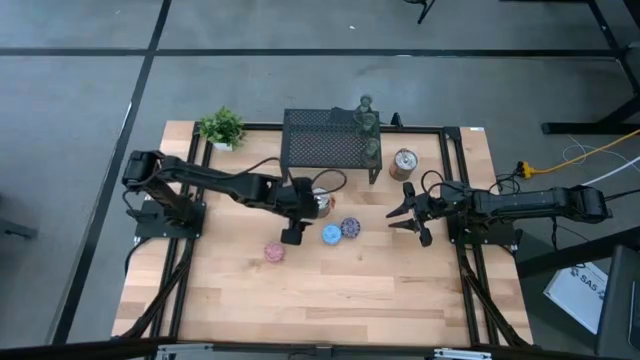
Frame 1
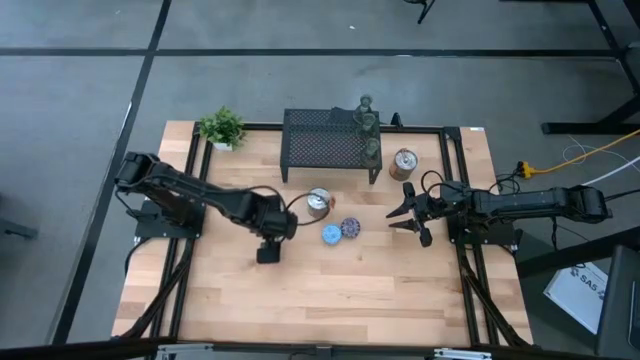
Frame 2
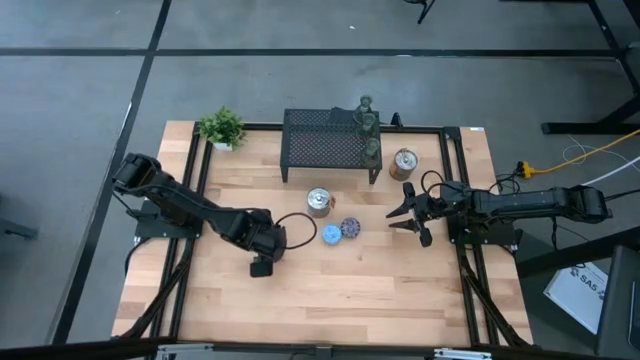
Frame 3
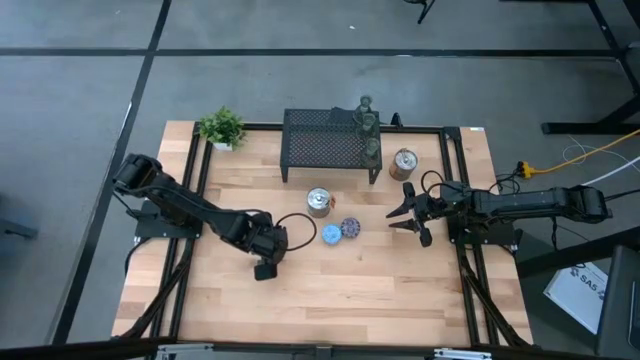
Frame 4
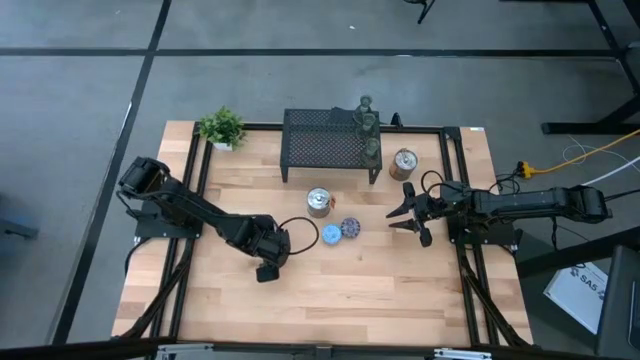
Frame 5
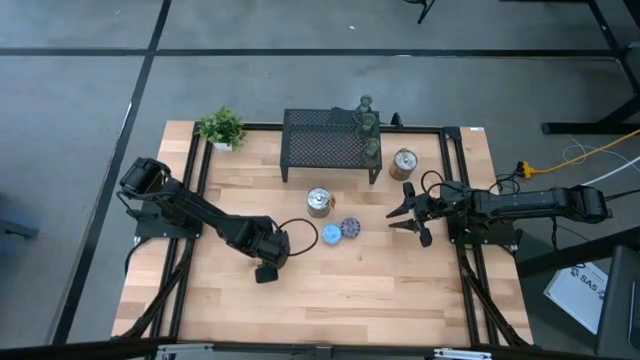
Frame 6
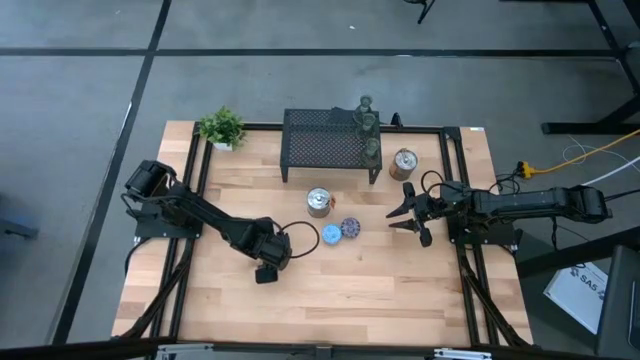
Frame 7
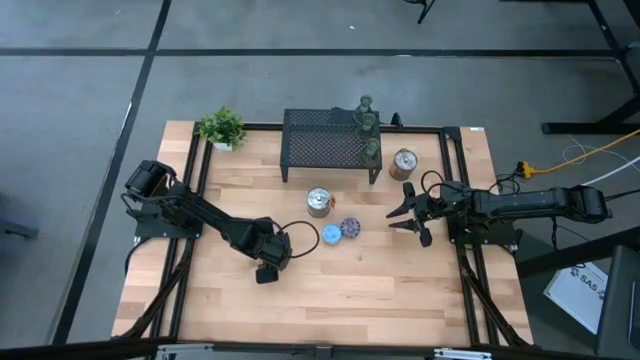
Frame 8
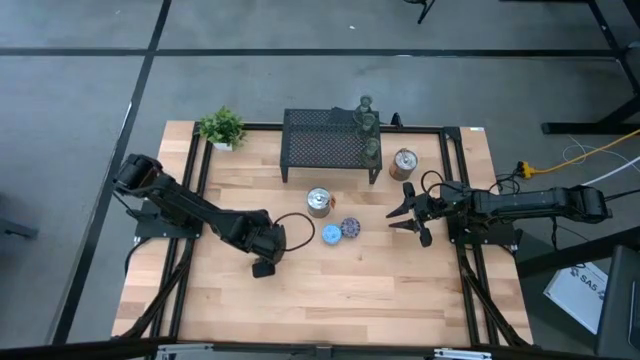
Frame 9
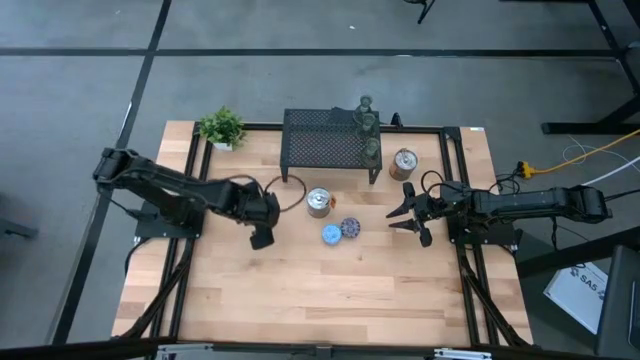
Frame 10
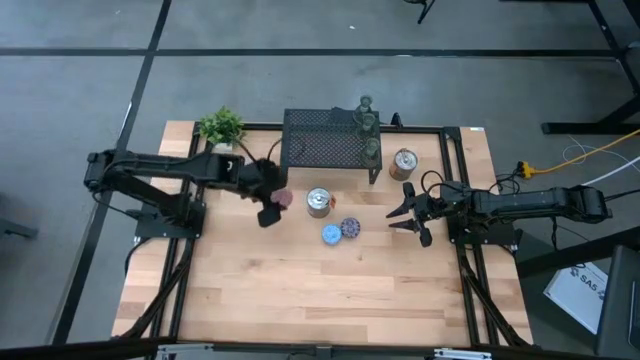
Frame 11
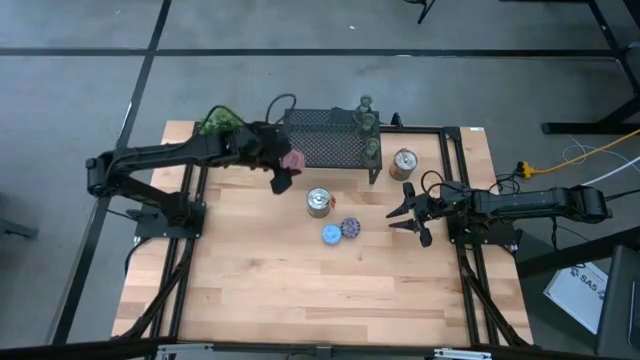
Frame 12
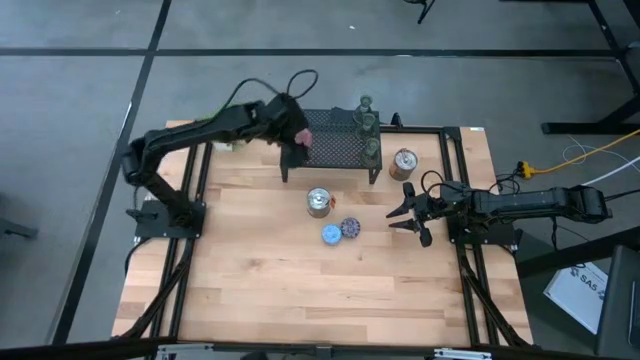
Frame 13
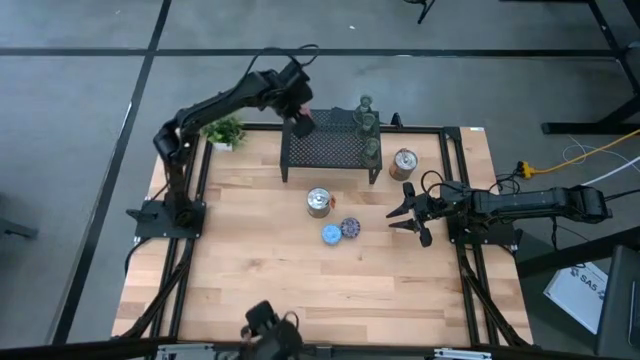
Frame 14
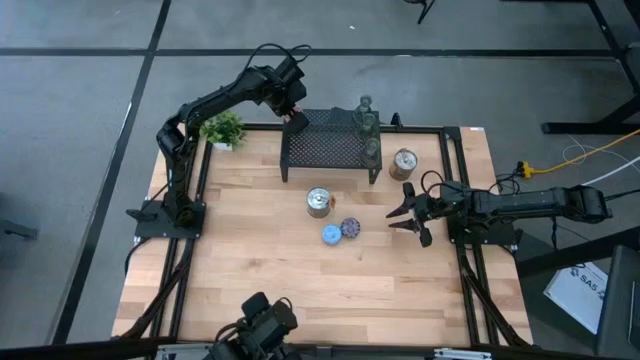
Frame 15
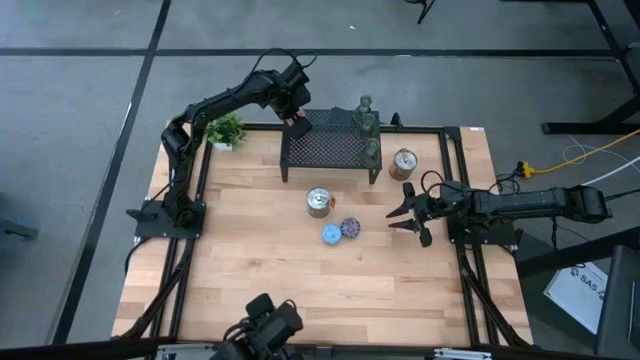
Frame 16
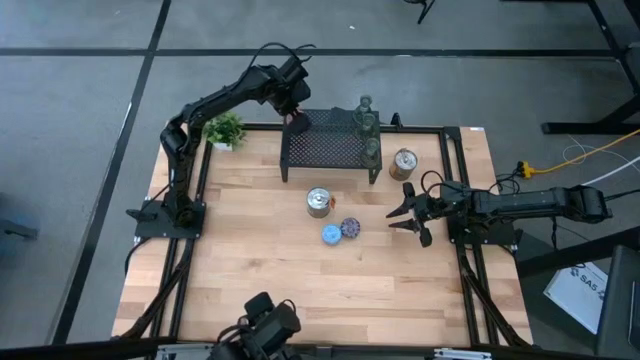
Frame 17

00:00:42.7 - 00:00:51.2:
Task: Pick & Place candle stick holders
Put the pink scented candle on the shelf

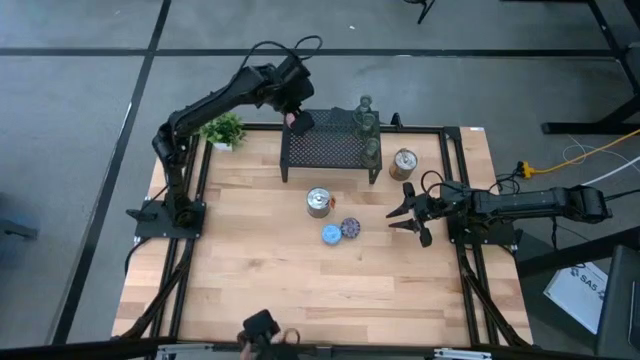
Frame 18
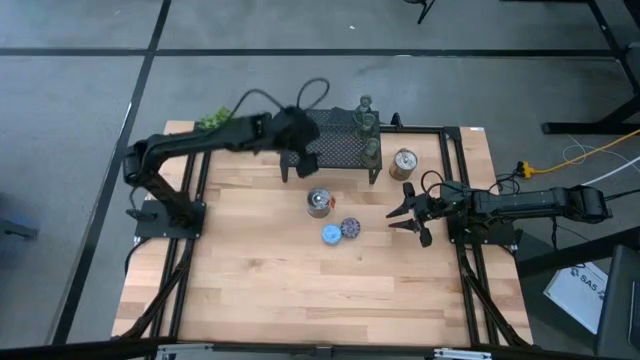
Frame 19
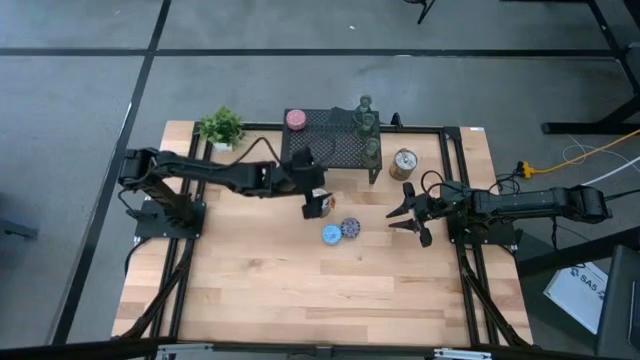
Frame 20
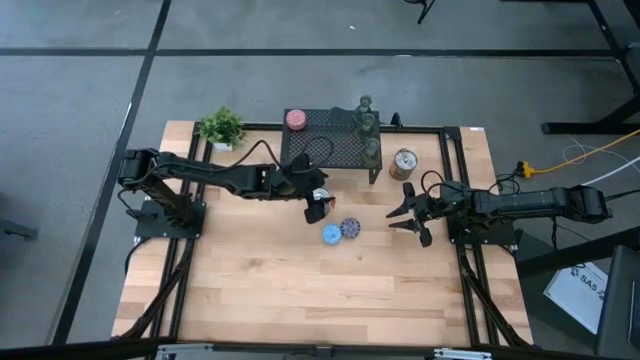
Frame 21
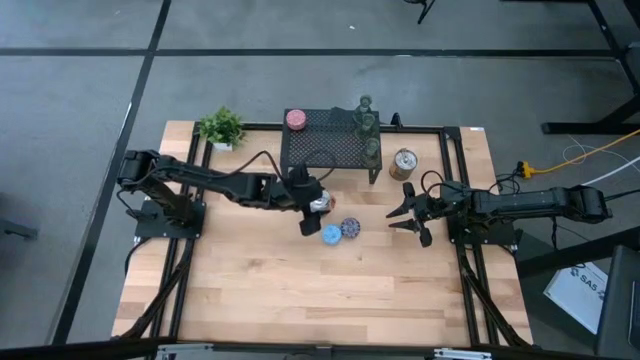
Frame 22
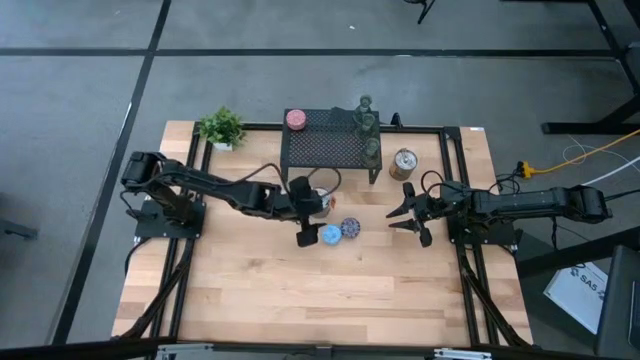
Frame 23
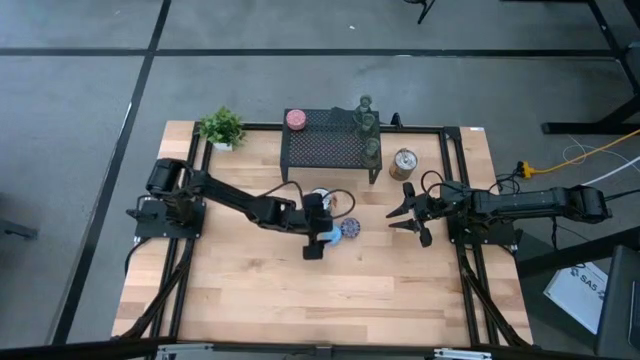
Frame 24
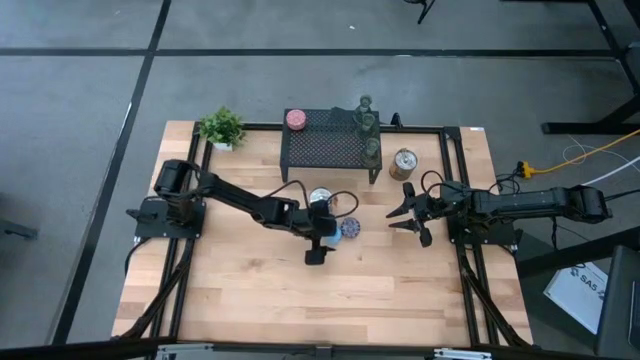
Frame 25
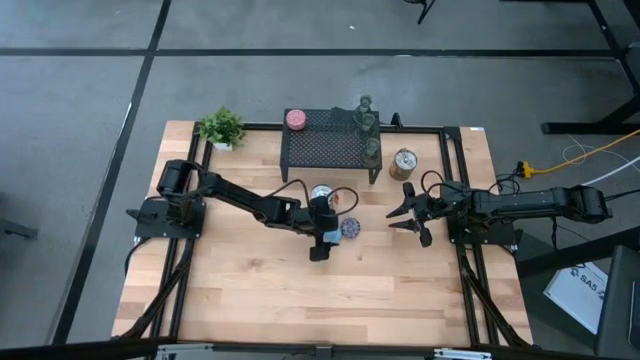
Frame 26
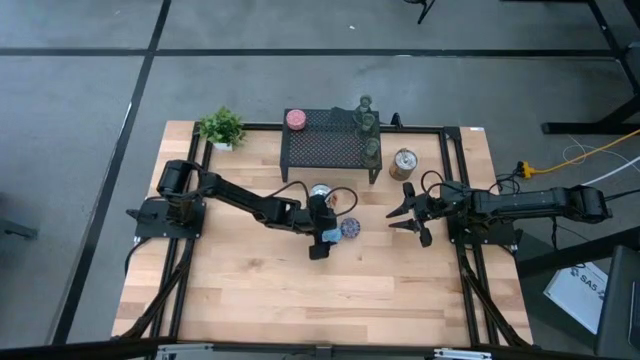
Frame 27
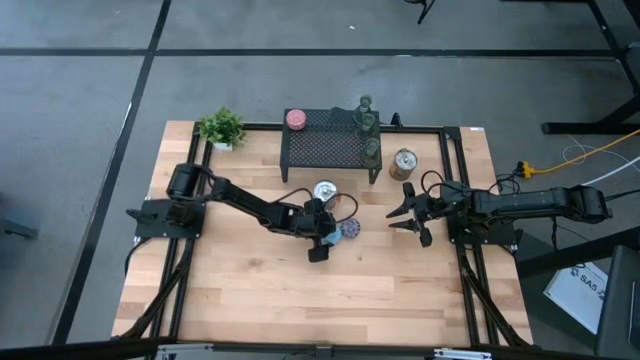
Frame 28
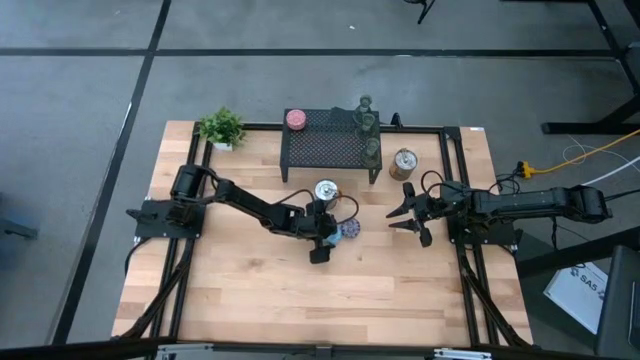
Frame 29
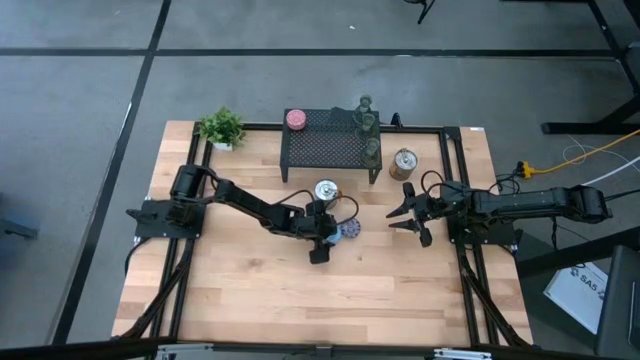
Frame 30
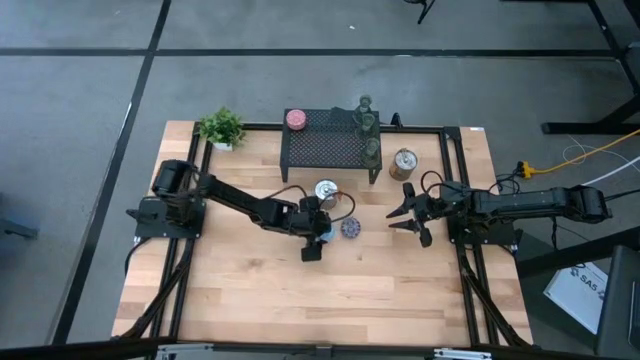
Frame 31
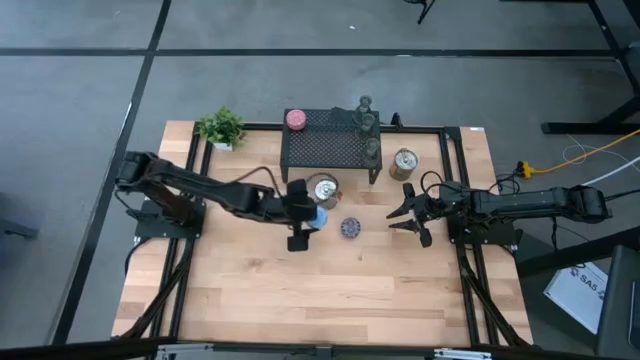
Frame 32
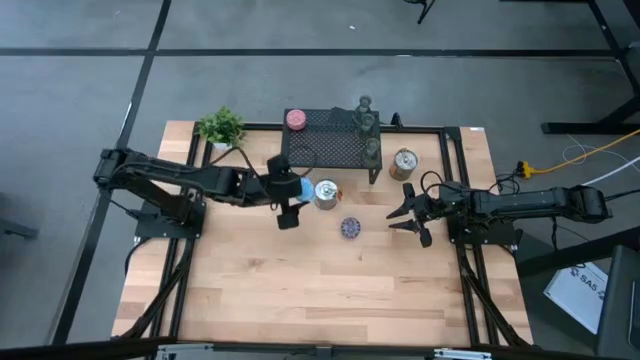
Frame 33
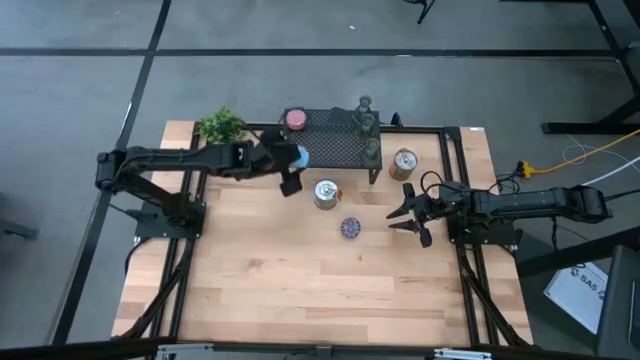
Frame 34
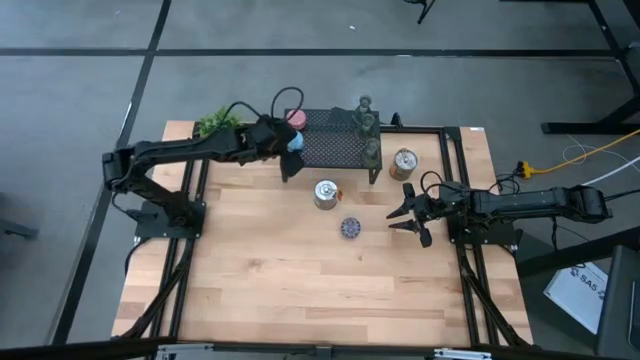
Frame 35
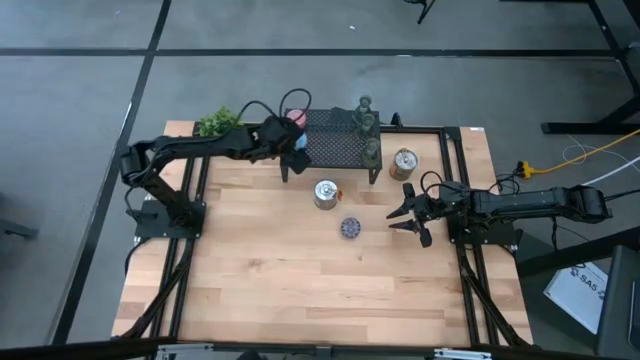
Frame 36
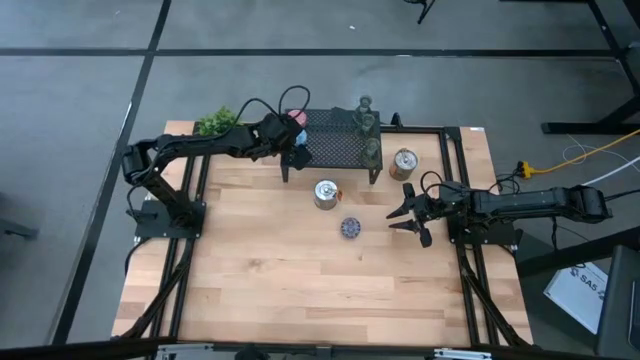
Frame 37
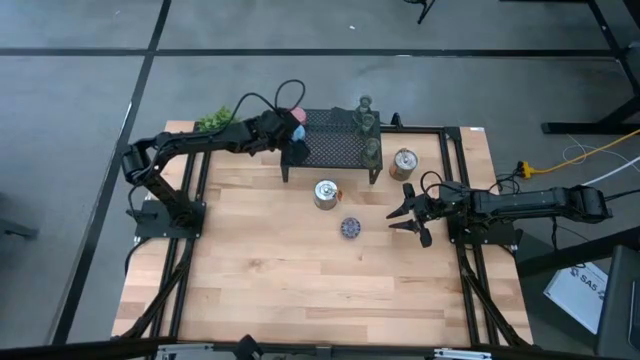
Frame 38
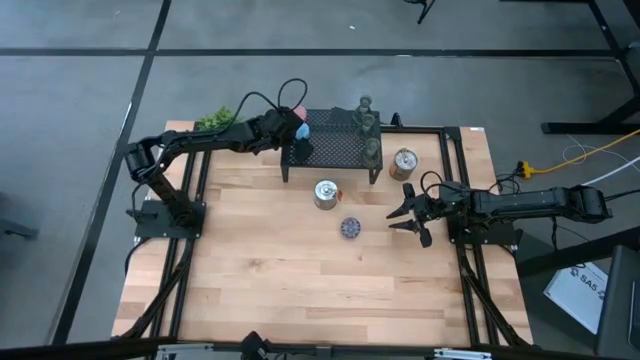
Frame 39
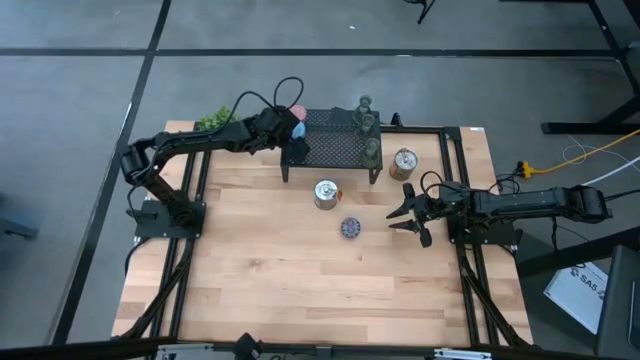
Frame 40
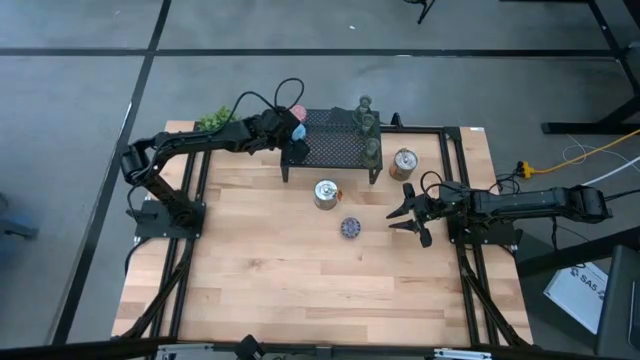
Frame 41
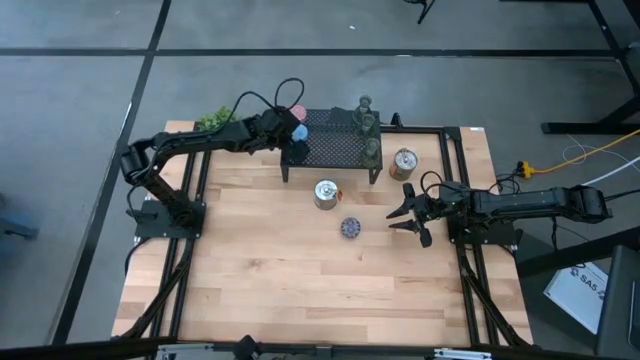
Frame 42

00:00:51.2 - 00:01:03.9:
Put the blue scented candle on the shelf
